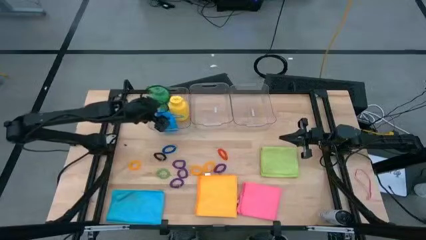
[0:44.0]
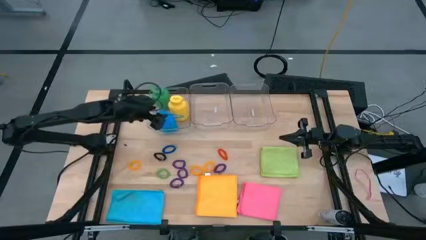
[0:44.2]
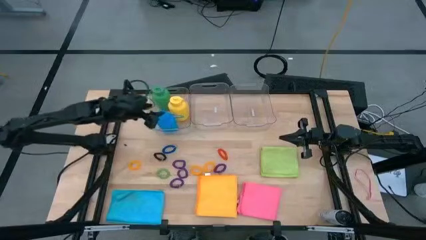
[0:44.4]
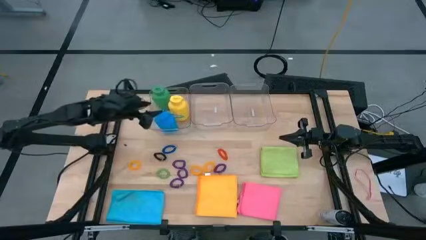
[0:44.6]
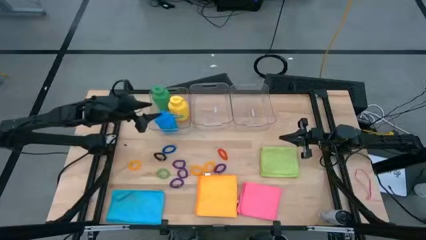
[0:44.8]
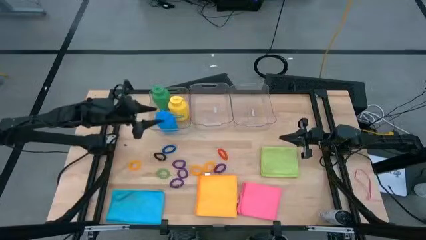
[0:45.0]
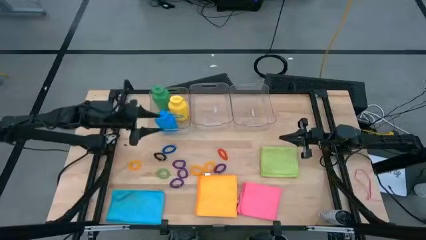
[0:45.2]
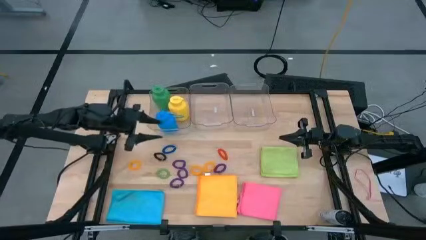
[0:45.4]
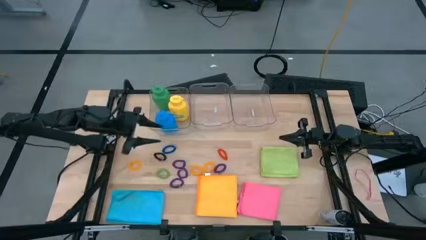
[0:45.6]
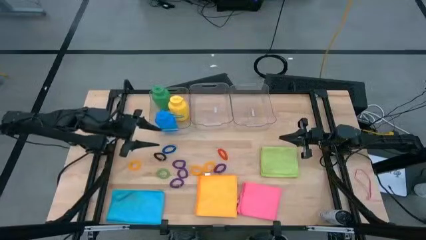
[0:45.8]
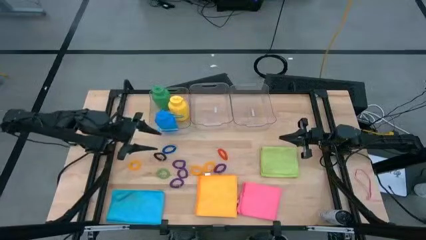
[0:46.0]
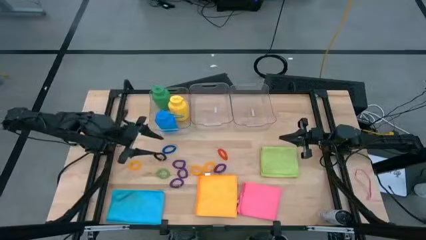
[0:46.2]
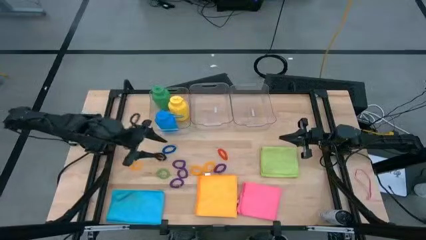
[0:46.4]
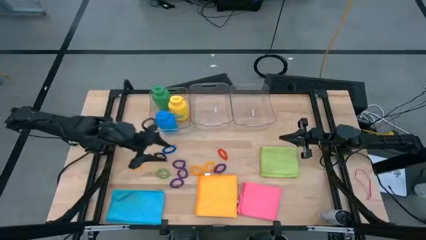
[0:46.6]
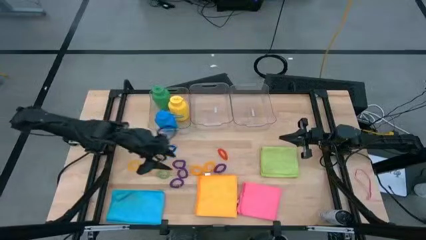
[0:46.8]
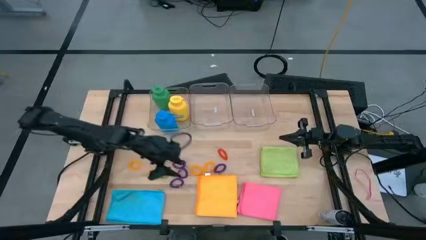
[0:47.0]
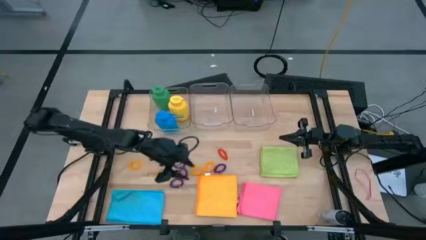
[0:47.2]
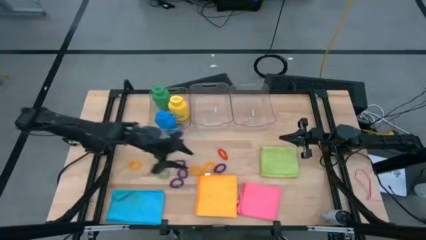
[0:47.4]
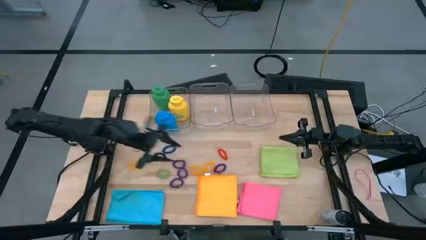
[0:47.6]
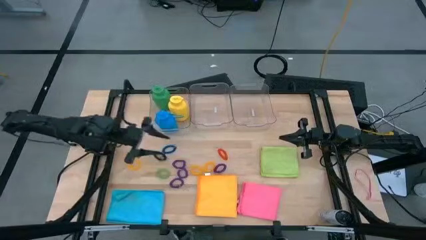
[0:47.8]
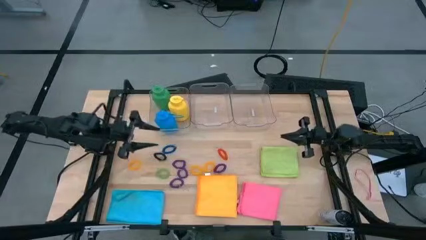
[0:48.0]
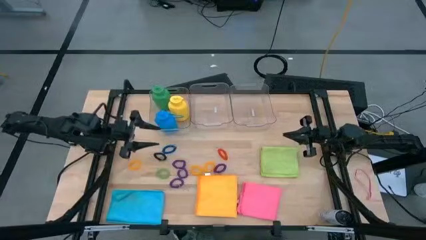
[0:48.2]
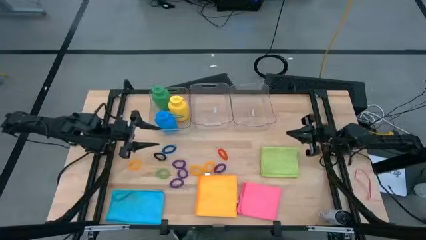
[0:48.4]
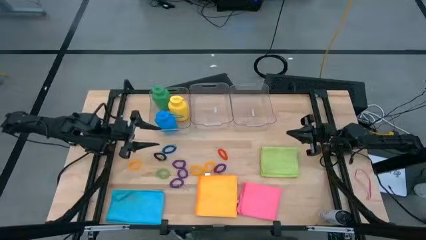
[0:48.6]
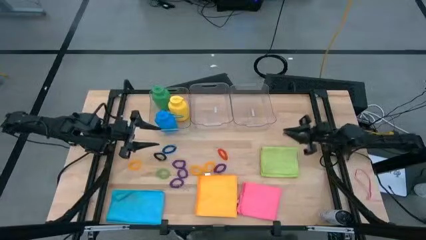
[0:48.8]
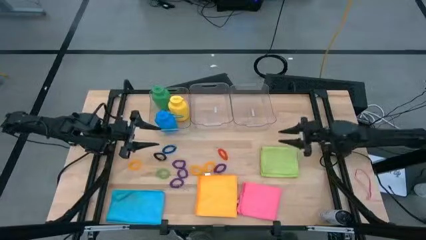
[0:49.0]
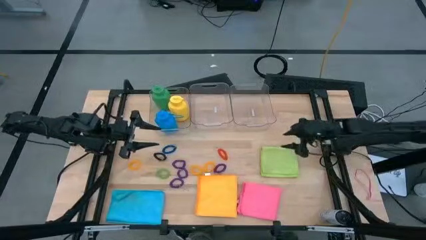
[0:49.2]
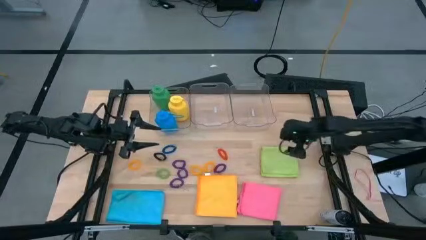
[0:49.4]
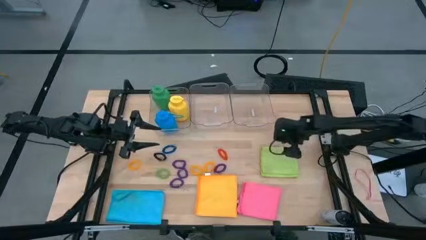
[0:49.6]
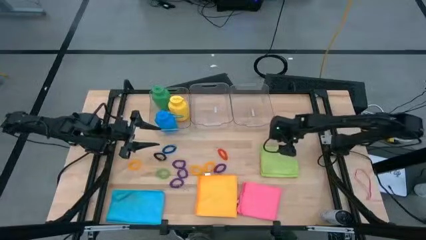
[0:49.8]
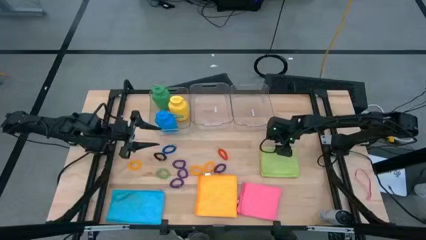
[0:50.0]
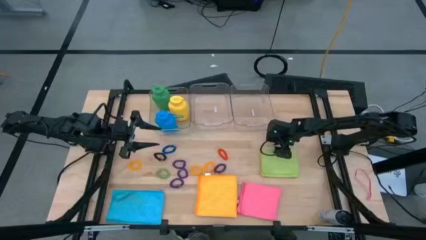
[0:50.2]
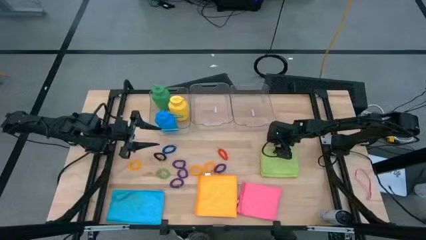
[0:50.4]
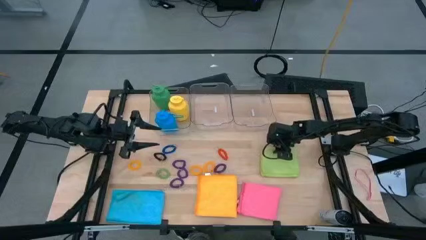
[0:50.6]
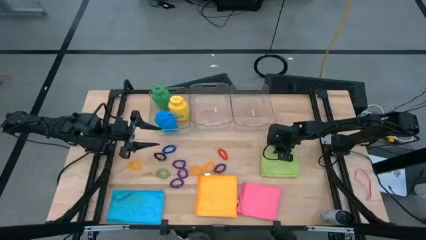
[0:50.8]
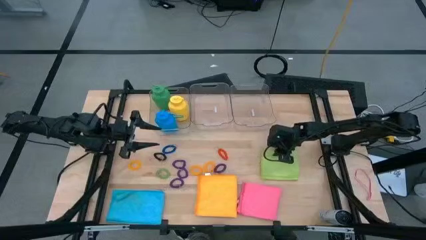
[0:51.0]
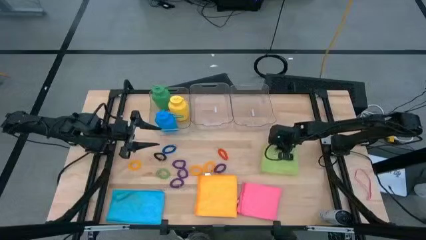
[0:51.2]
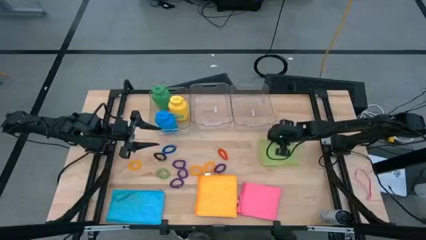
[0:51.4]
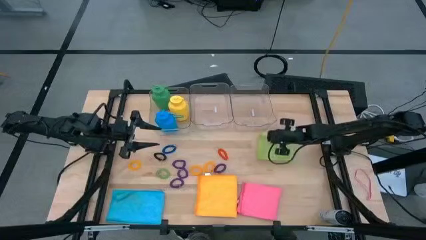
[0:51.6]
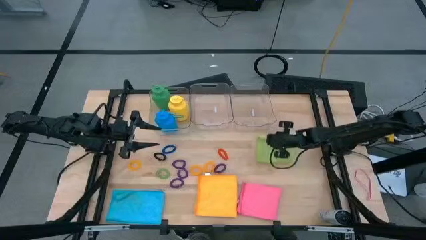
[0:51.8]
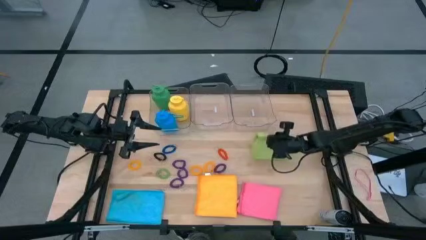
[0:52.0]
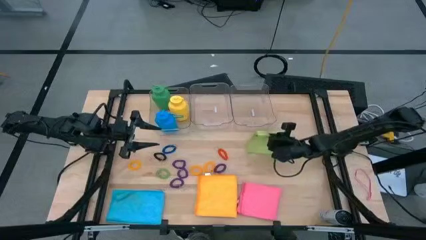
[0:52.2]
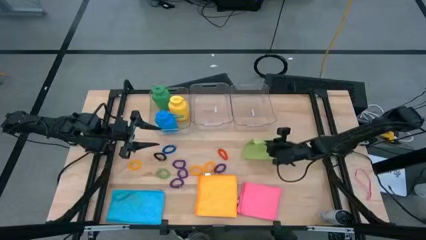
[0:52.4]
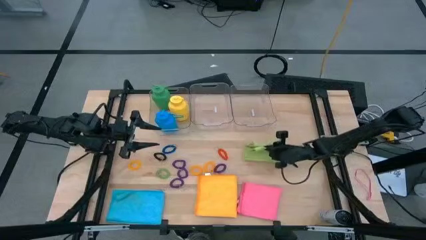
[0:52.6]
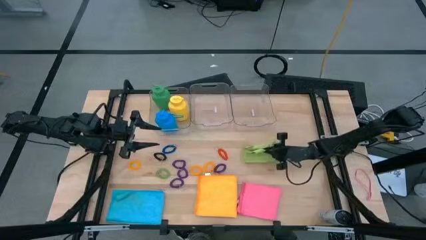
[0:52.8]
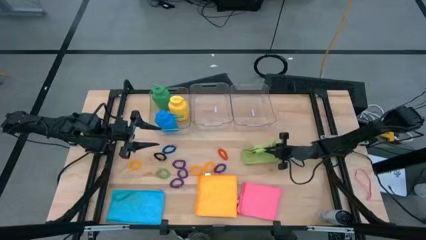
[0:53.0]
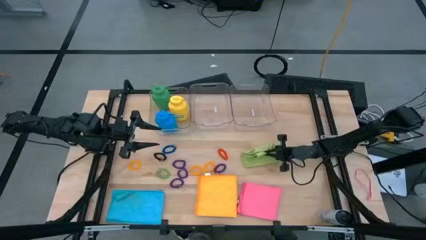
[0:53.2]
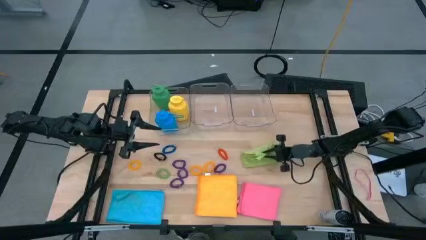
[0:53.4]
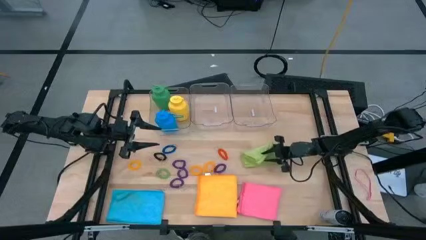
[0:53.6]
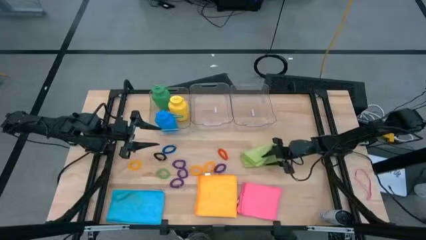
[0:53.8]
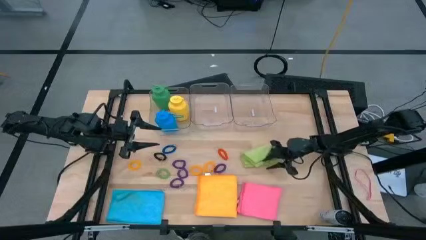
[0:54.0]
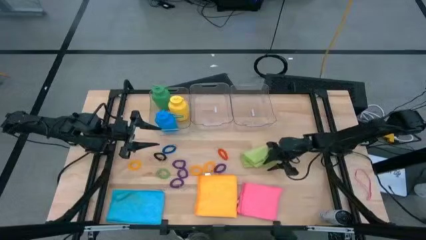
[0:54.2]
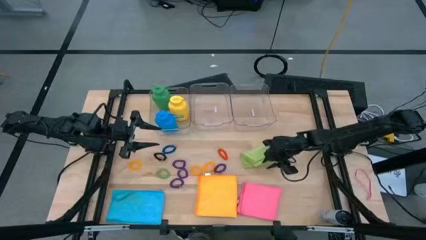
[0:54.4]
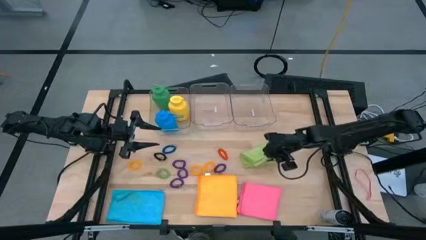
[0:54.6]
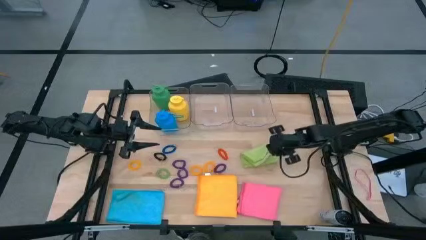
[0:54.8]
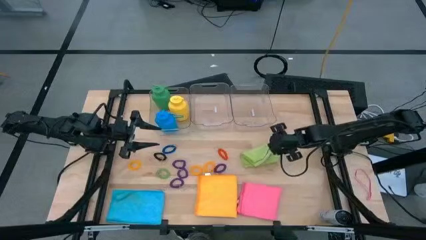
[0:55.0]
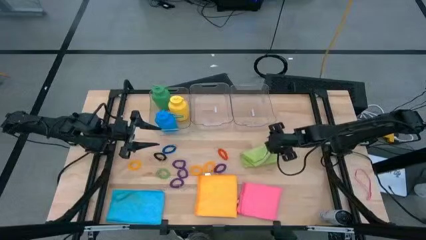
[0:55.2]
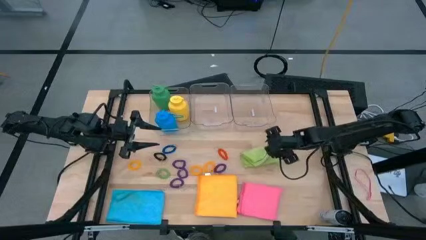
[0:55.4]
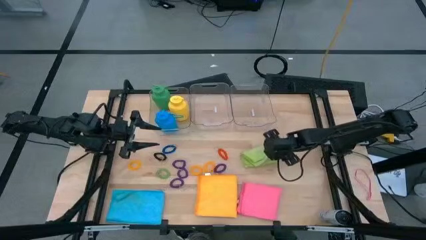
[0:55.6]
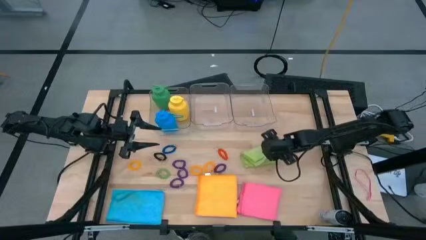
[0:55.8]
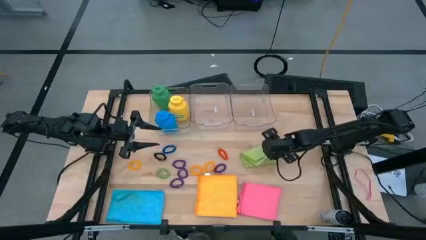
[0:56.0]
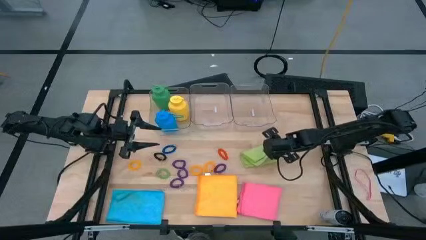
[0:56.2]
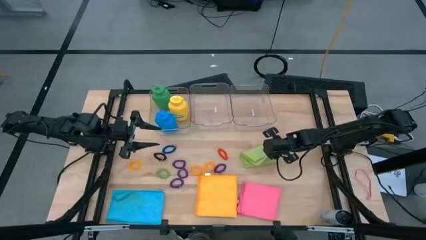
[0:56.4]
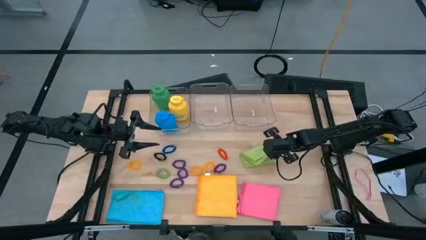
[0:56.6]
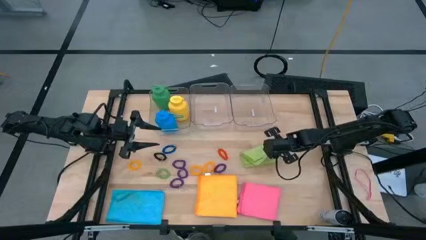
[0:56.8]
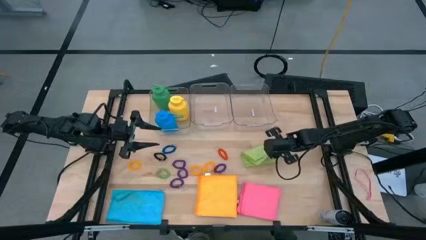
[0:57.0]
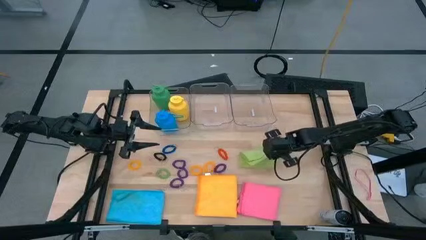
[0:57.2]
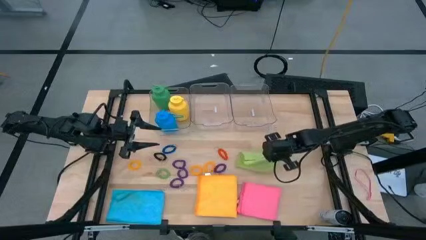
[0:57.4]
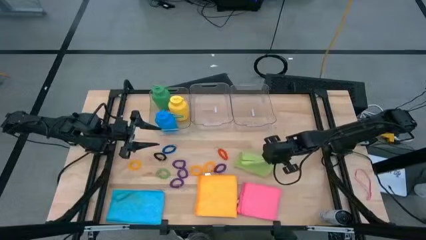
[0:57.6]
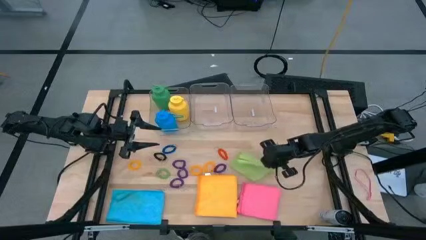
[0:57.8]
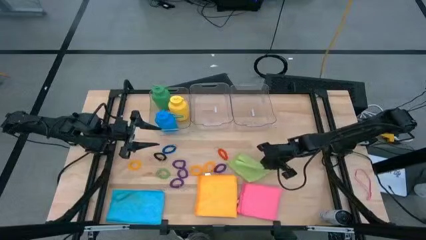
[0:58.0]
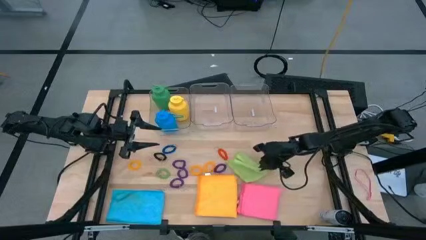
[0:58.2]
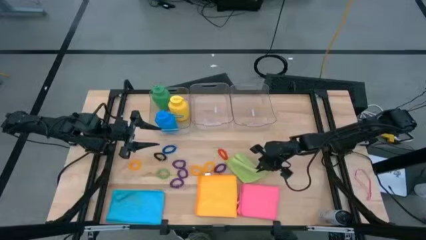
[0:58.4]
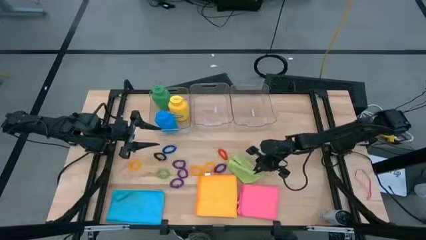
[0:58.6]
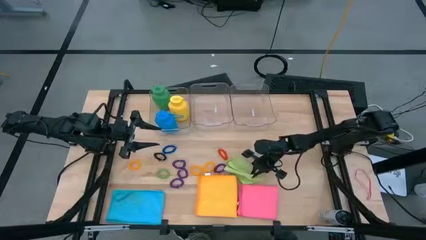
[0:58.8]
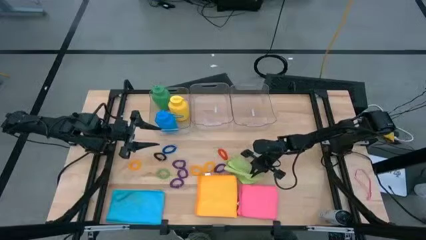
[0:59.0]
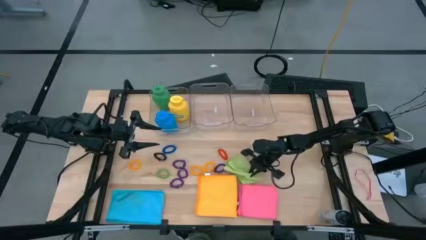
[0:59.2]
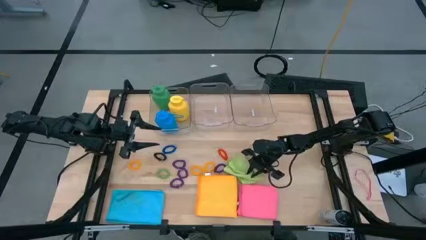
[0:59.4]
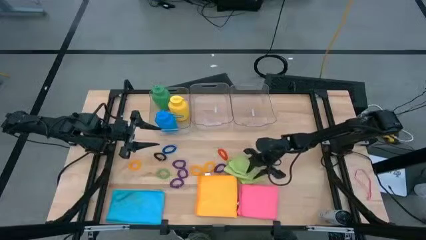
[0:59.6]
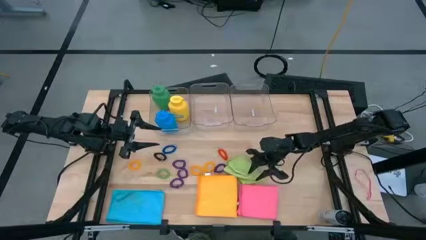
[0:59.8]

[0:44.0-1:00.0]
Task: Pick & Place Sports Items
Fold the green cloth
